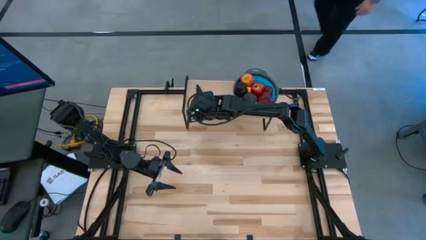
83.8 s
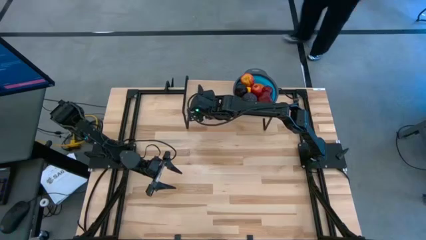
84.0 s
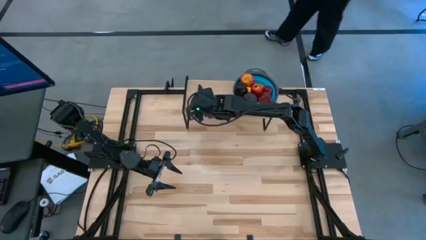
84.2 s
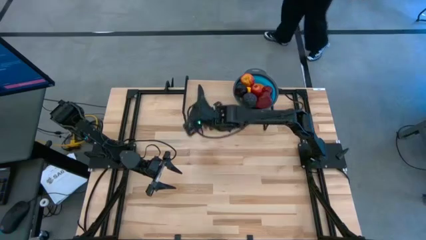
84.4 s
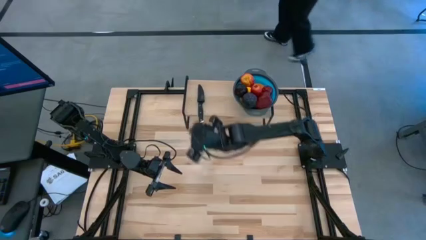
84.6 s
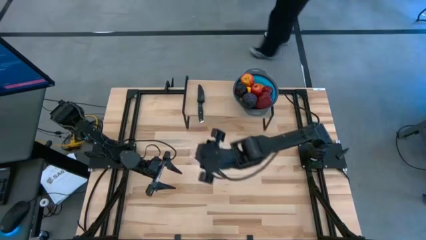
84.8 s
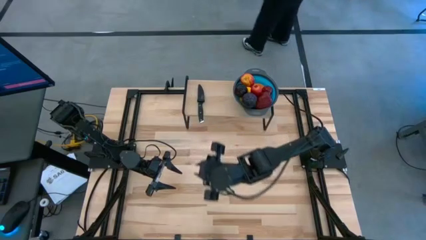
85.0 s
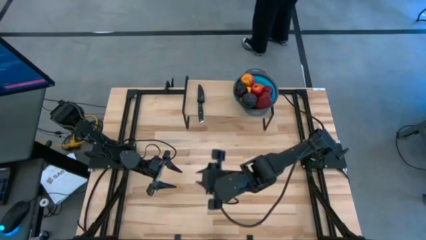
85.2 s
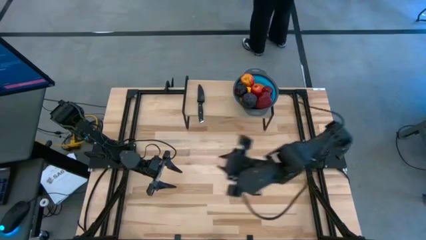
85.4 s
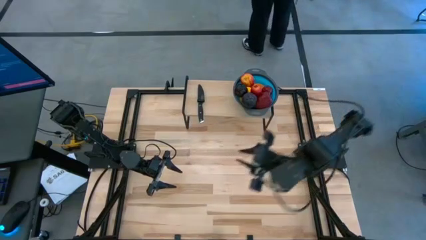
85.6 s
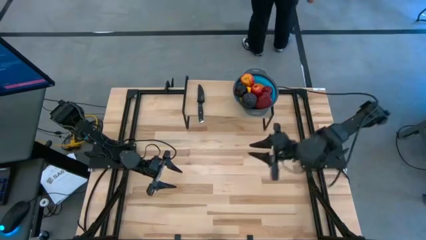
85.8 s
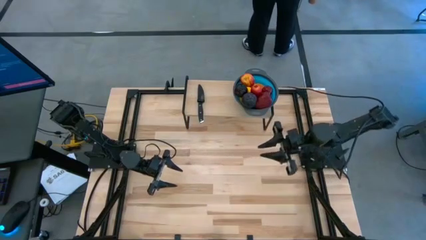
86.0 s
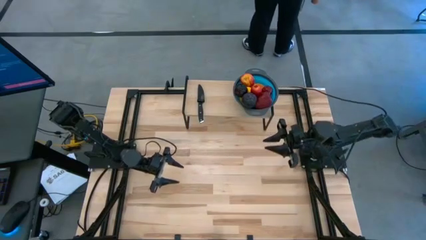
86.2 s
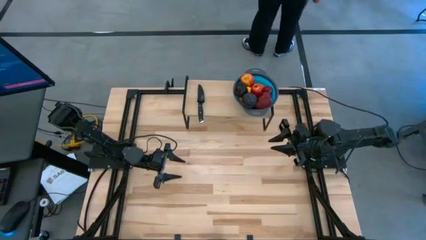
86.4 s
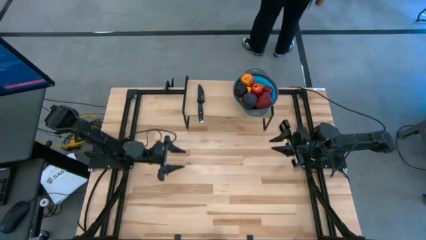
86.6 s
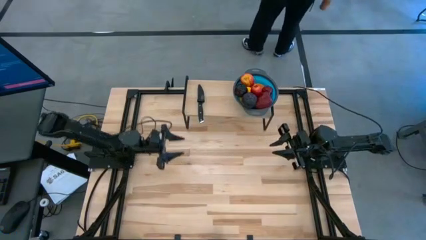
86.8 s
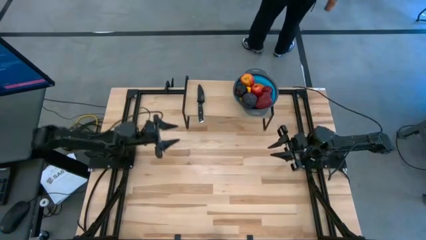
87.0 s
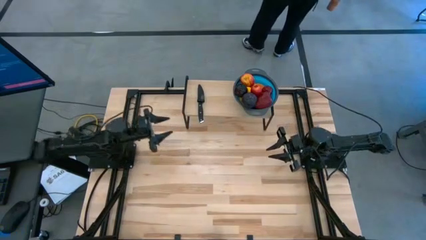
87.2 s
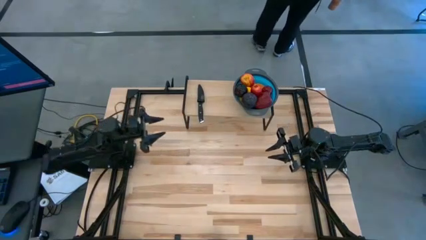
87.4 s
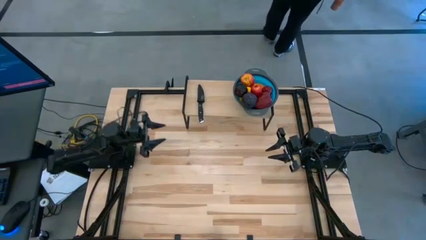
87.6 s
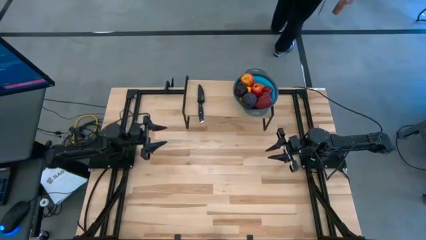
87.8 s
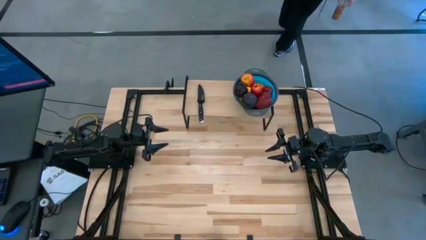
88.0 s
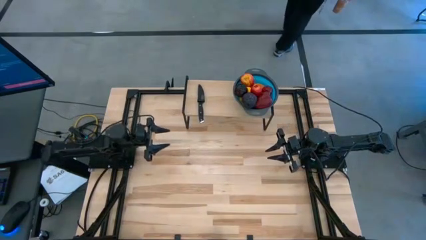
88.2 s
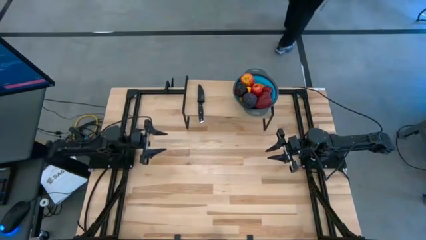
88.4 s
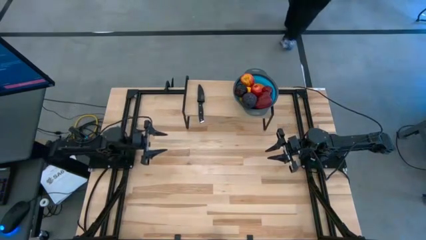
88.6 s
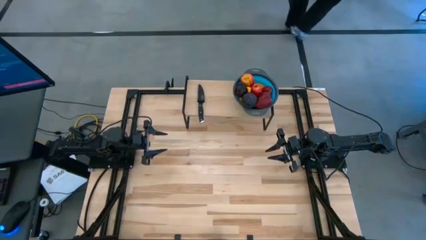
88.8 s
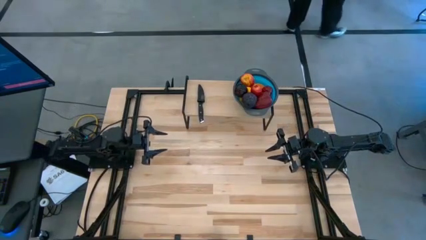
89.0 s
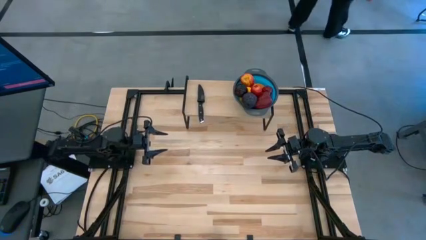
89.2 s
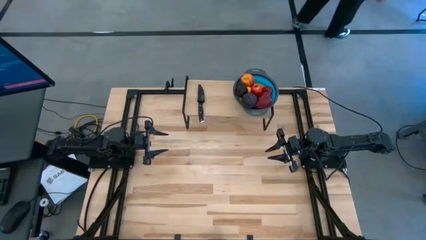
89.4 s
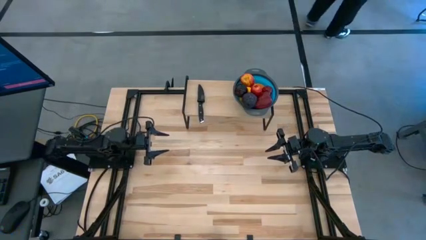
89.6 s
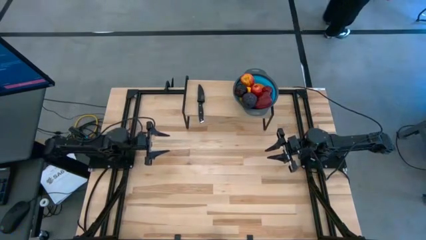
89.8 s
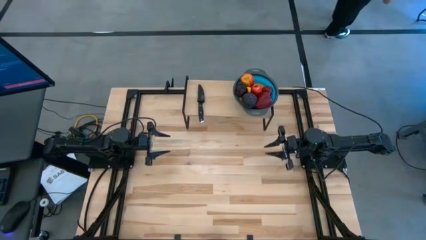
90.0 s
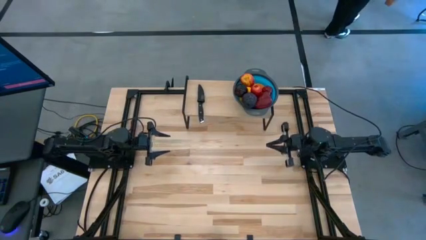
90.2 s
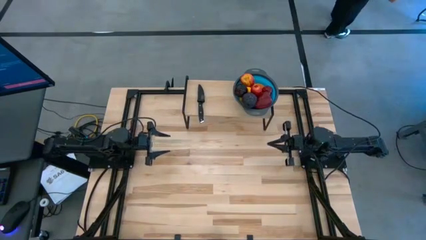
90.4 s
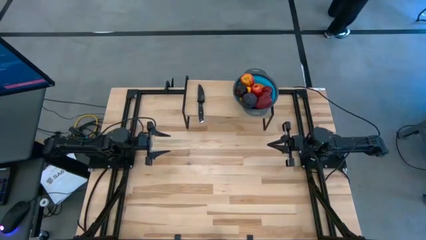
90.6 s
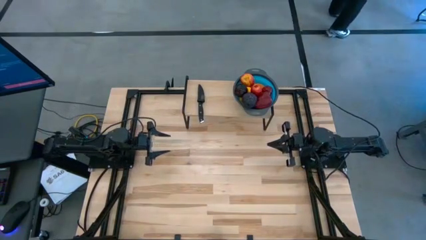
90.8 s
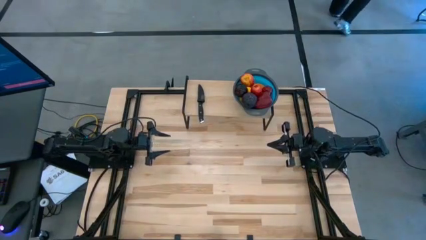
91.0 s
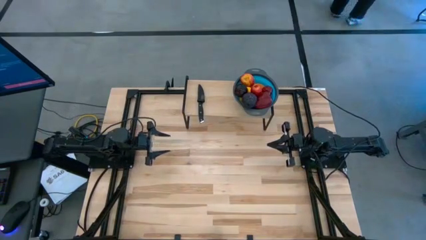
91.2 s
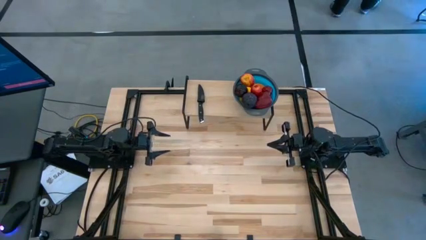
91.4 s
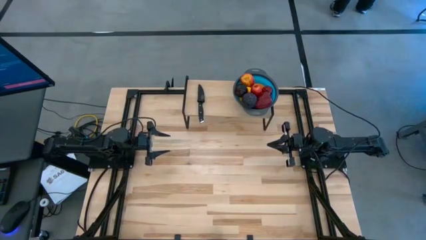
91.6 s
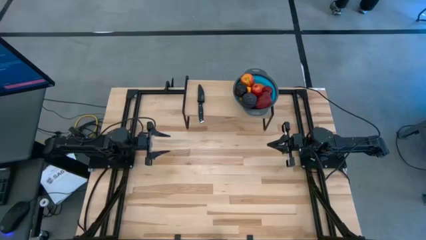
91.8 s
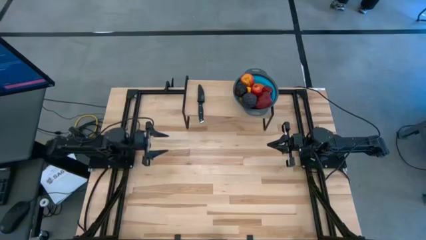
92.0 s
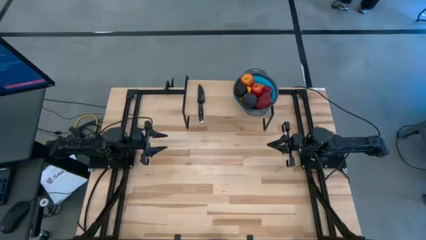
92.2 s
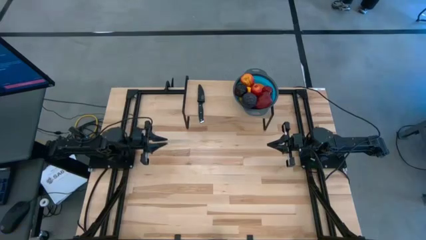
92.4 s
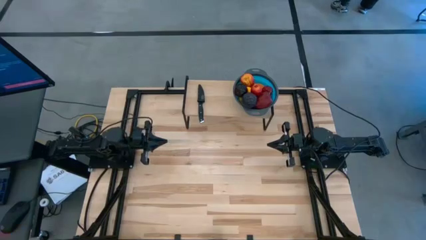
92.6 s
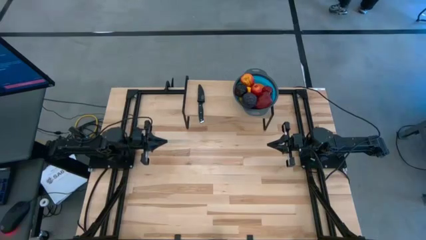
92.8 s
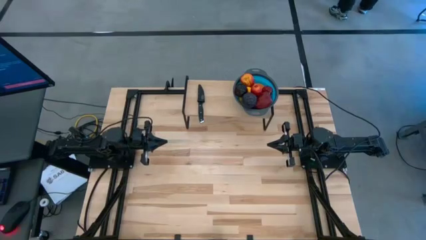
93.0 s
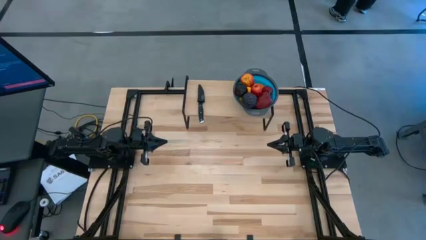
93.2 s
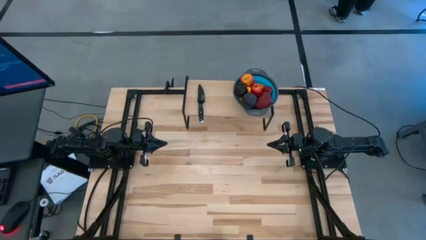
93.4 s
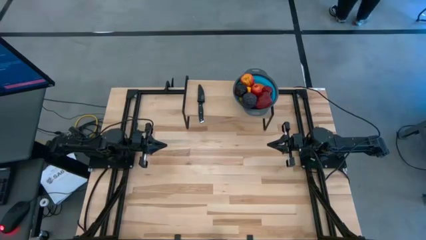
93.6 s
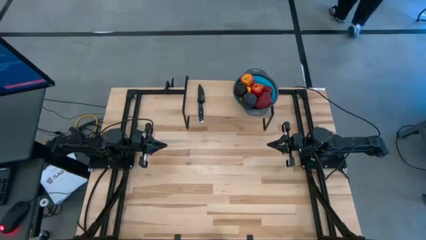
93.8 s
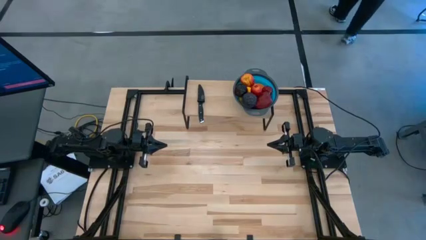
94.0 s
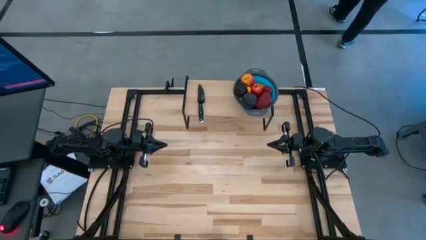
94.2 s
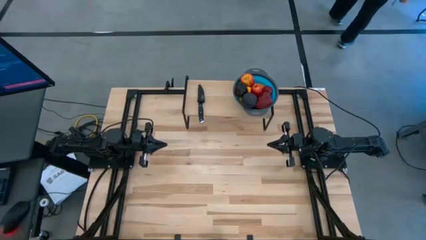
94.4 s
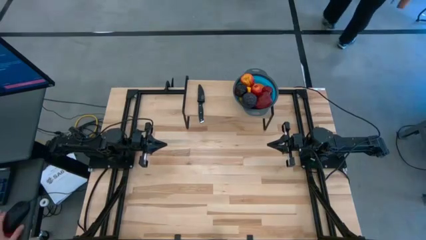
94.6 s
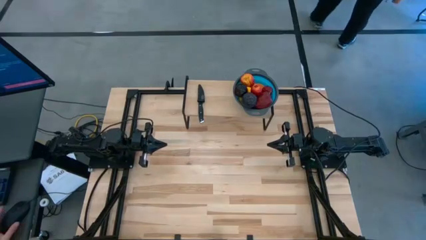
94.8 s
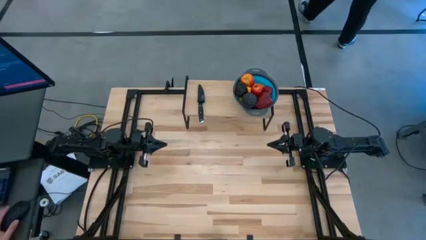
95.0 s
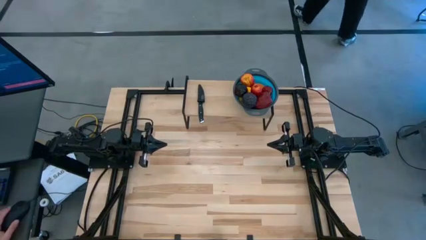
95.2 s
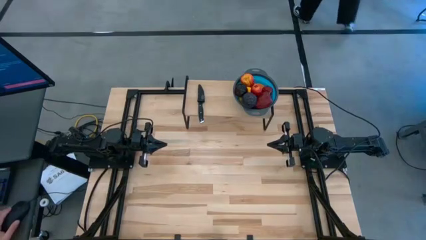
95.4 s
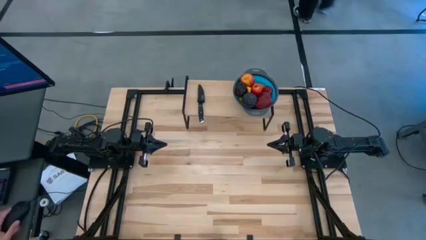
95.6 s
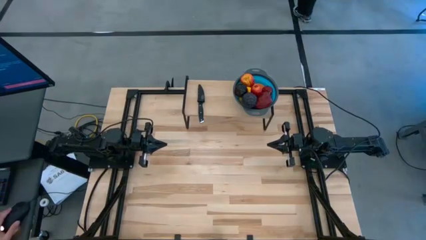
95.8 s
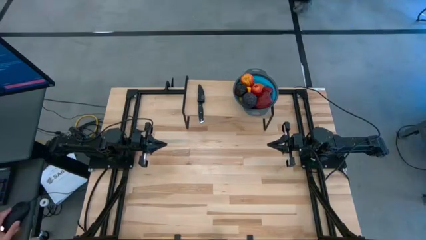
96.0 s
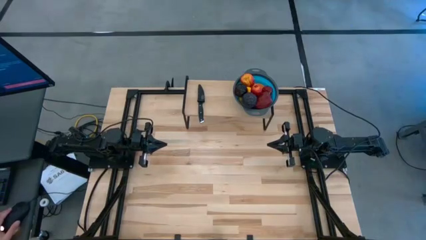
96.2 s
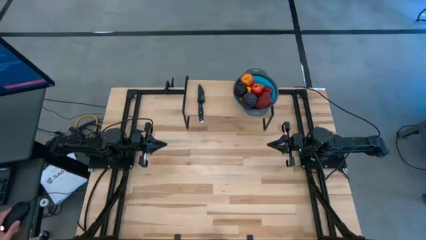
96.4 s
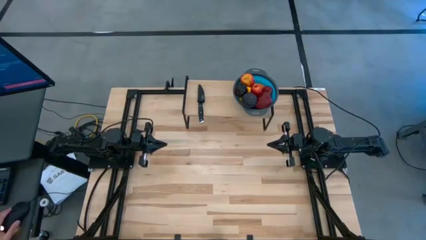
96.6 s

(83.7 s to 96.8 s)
Task: Pick & Place Fruit
Return to Home Position

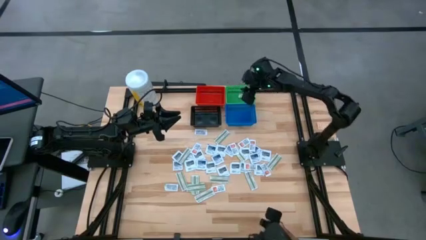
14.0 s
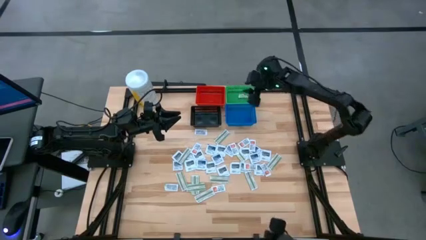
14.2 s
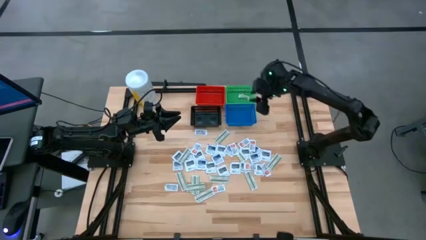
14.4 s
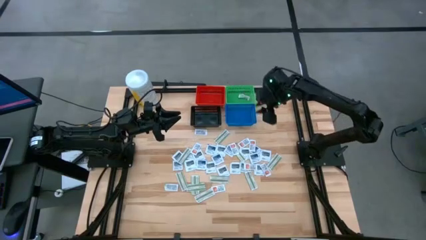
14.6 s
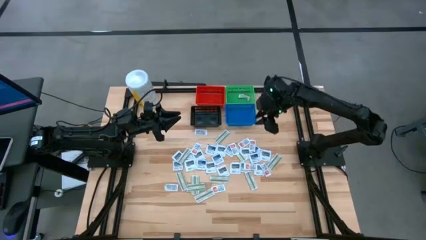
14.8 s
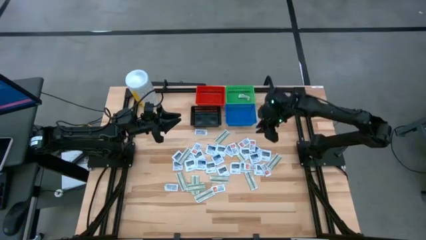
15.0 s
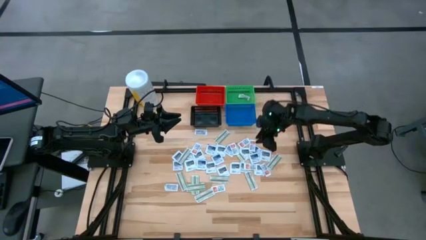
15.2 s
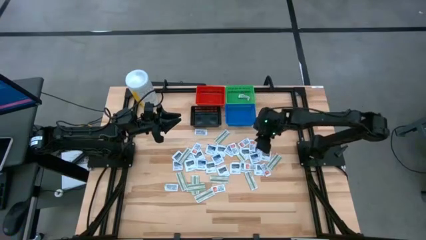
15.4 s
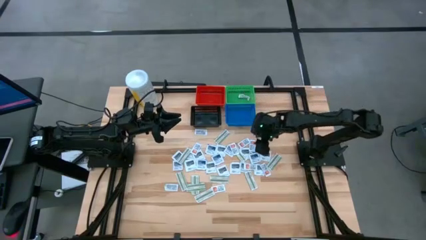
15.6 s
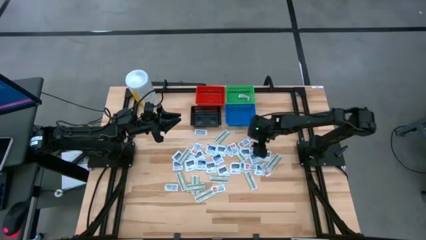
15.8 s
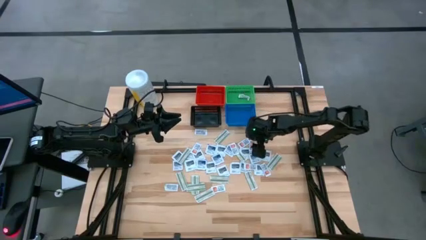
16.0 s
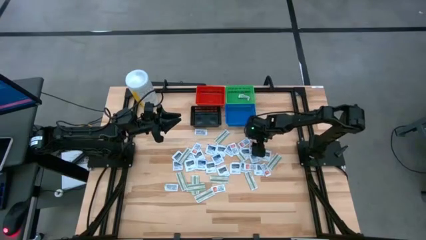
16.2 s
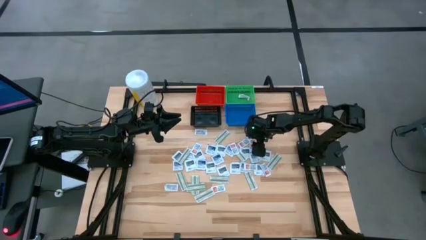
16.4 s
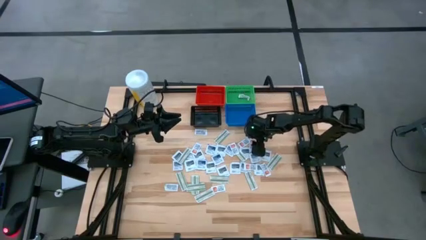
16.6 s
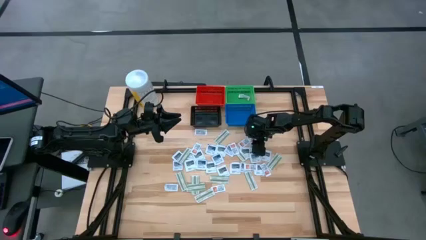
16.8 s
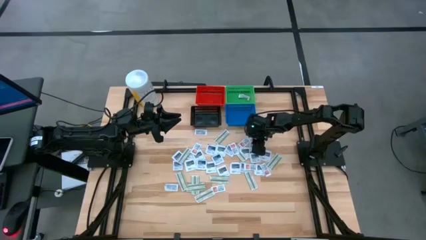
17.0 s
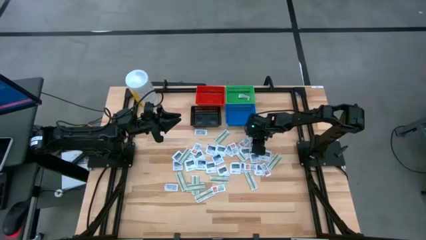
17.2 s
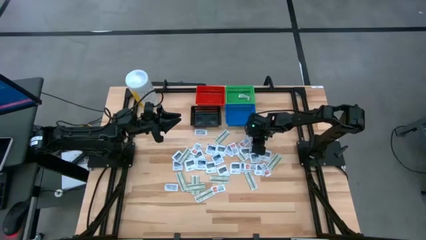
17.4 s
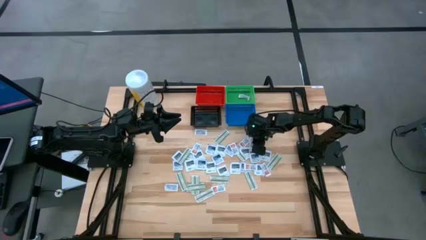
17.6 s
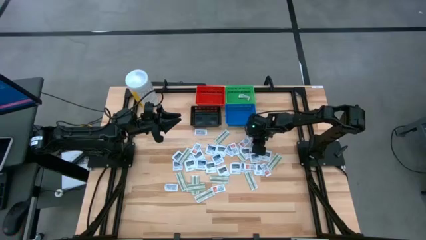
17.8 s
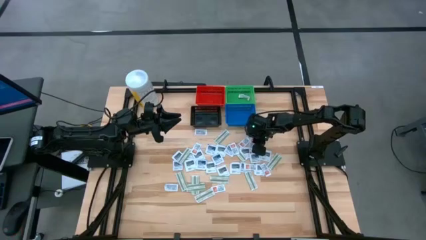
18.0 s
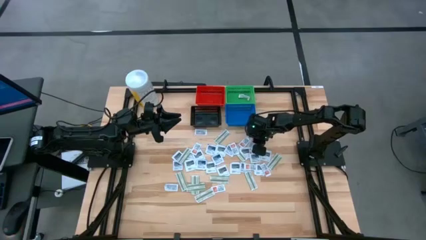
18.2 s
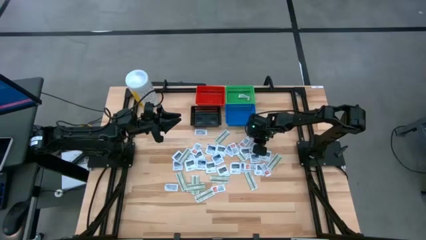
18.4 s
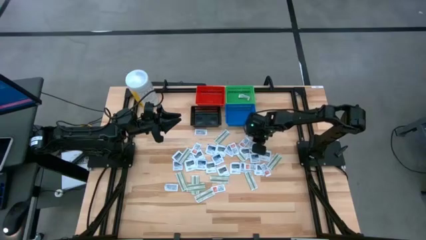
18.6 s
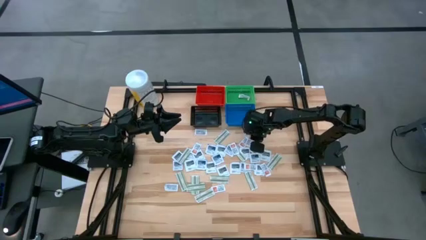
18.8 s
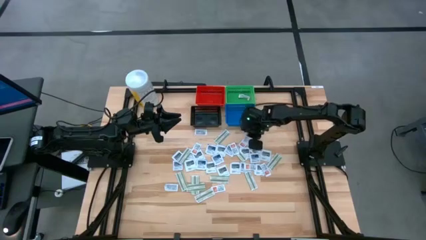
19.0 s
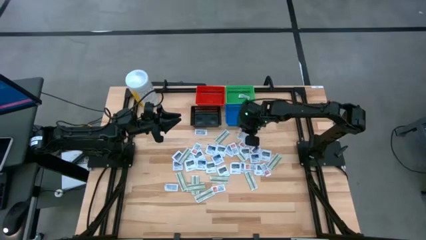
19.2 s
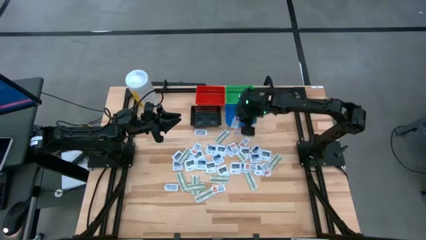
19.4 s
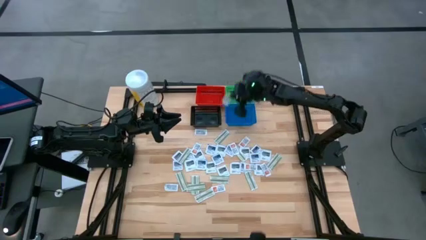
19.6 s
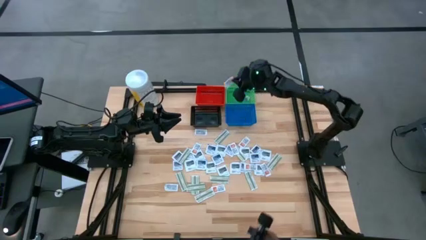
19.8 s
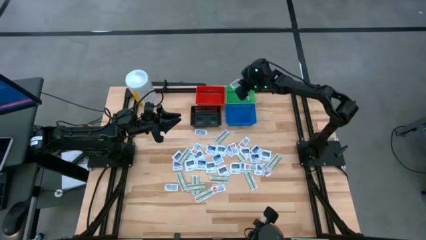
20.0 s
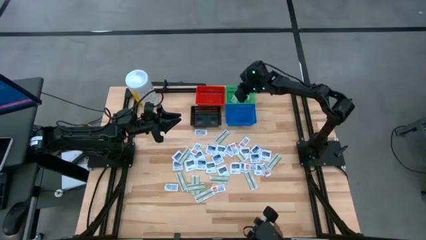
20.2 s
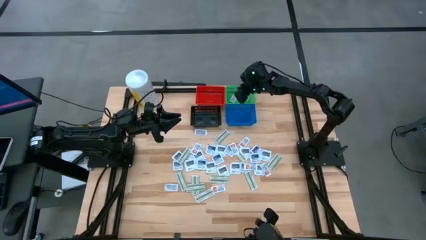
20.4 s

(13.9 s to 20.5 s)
Task: Pick & Place First Aid Supplies
Put the ointment pack into the green basket
